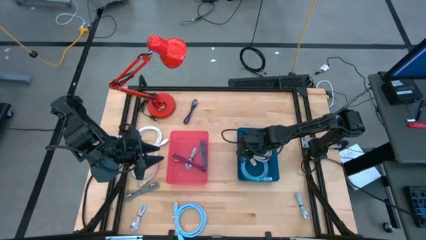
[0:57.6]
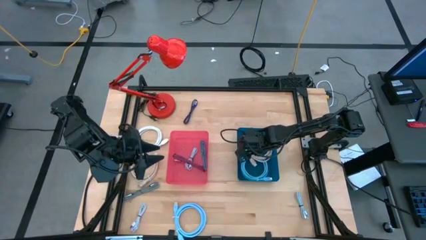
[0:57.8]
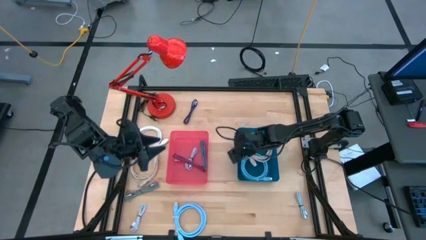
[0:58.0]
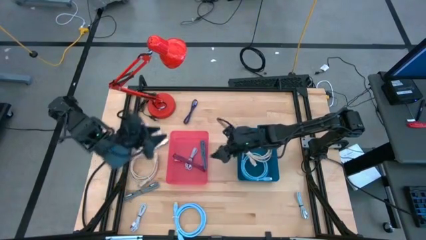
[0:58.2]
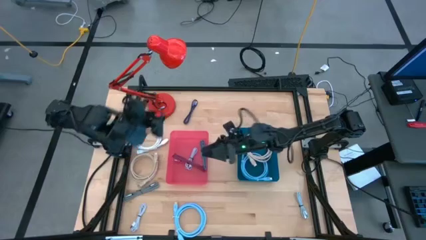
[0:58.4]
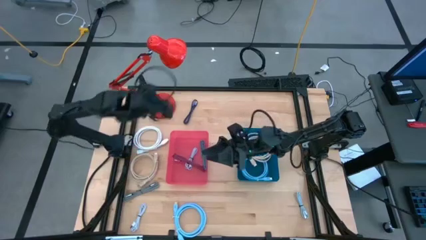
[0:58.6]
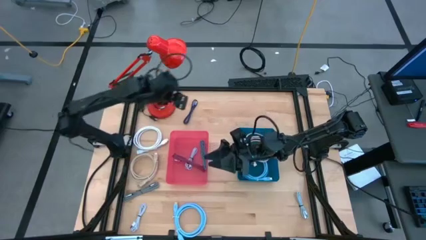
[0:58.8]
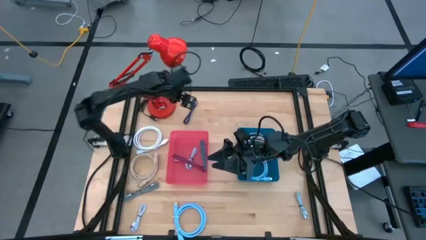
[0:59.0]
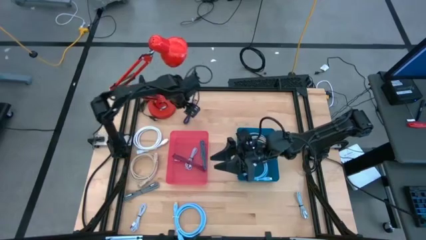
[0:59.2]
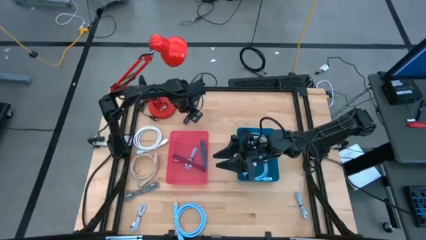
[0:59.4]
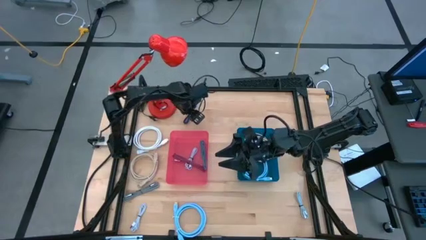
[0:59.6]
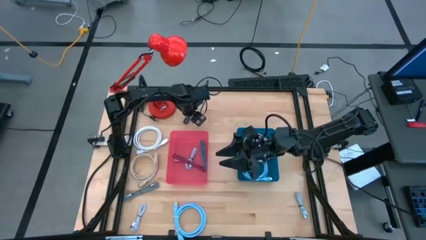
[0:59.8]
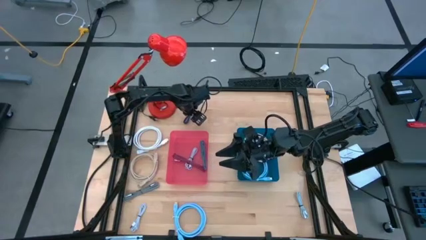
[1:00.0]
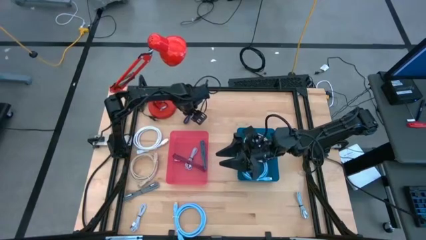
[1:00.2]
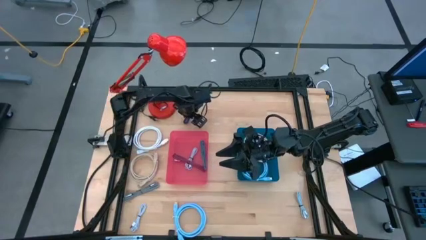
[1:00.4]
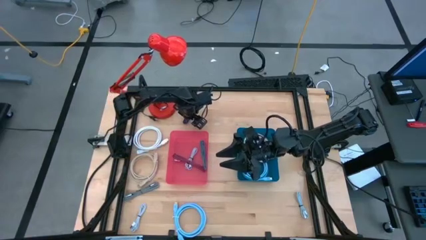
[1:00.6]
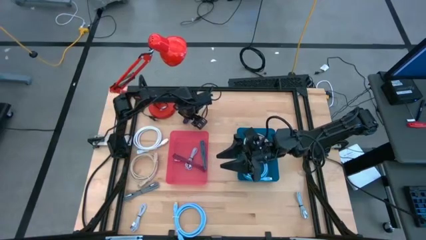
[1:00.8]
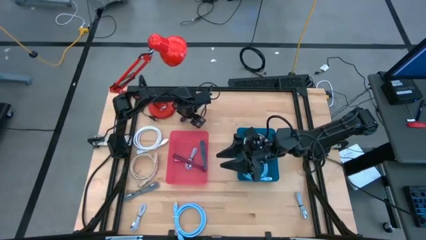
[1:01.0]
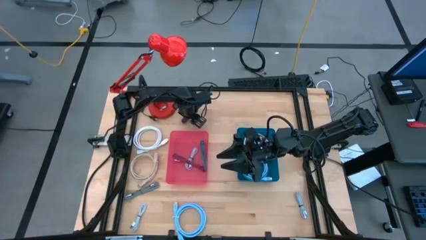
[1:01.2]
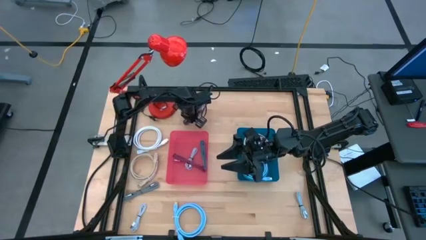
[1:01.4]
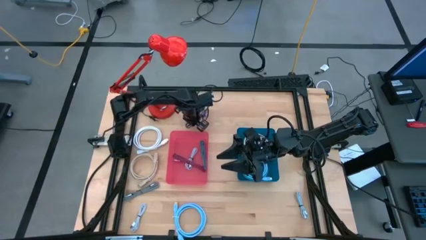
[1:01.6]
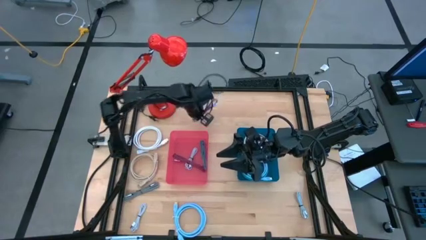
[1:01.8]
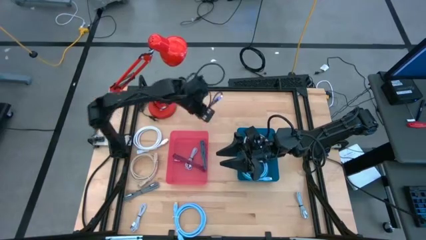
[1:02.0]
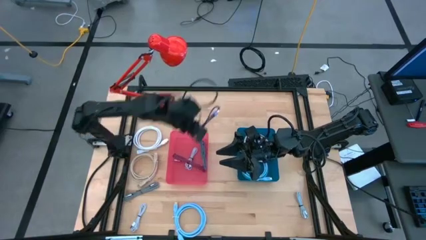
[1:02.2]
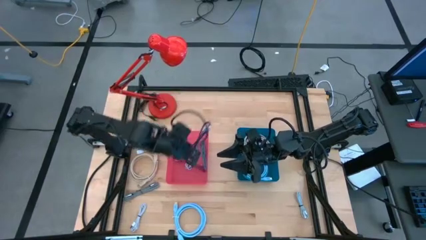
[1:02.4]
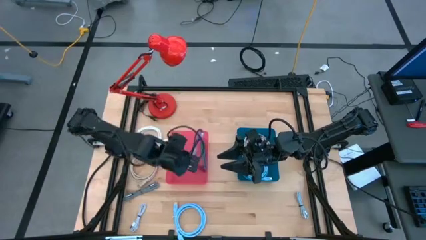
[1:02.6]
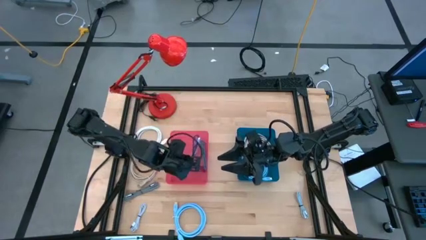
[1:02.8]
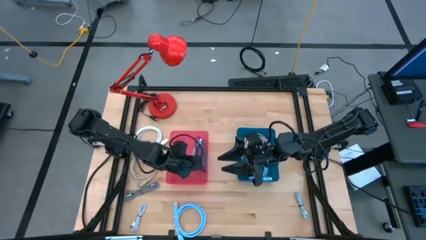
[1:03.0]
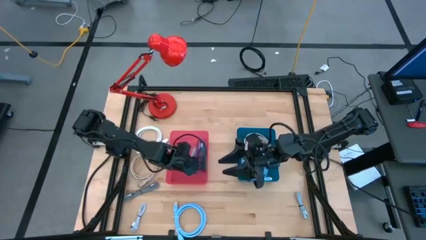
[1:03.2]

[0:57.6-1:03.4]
Task: Pick & Place USB Port
Put the black and violet charger cable into the red bin

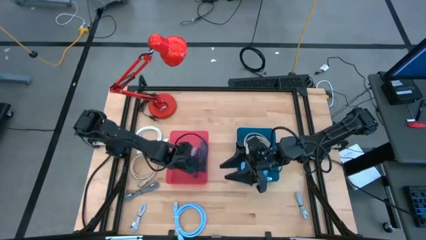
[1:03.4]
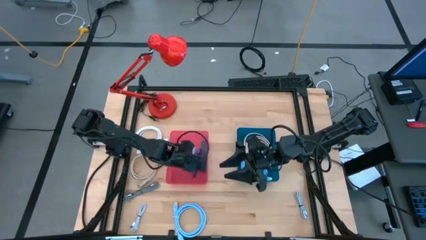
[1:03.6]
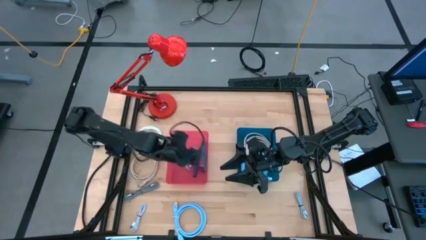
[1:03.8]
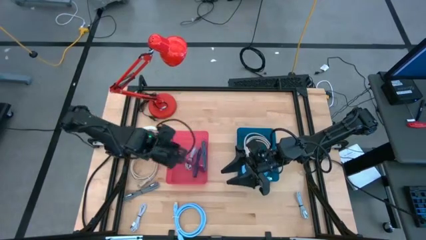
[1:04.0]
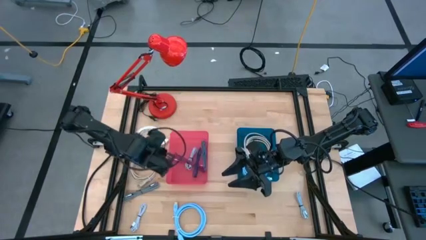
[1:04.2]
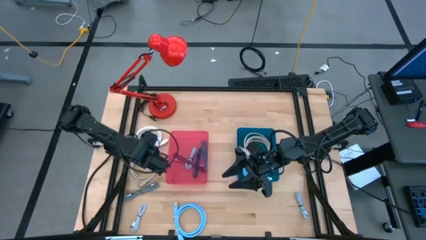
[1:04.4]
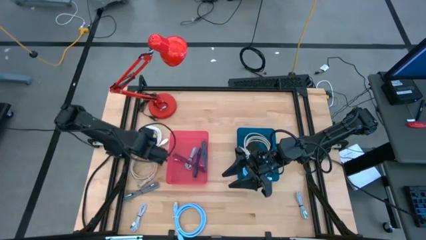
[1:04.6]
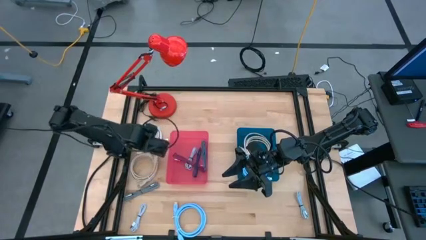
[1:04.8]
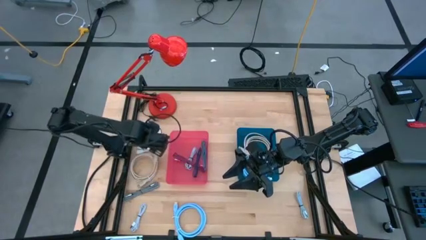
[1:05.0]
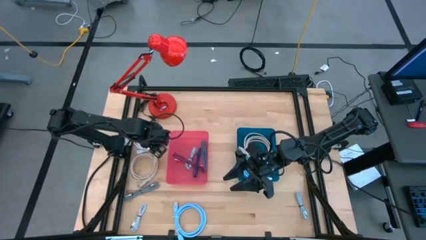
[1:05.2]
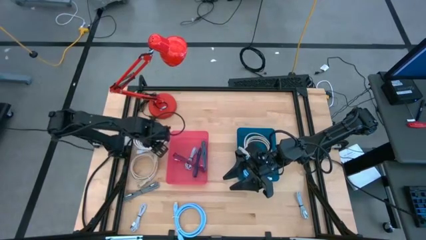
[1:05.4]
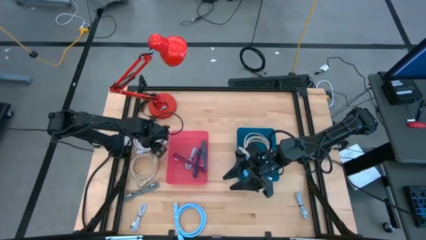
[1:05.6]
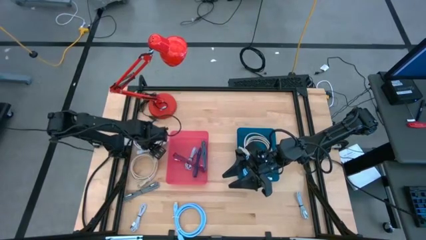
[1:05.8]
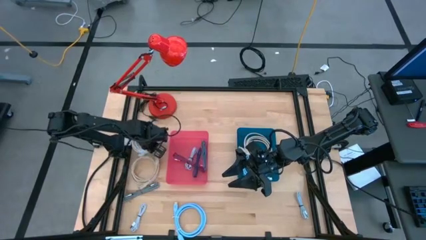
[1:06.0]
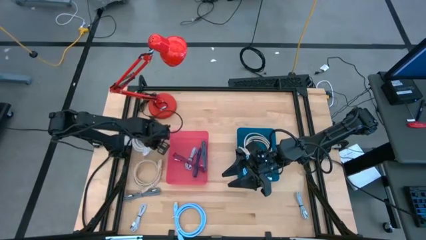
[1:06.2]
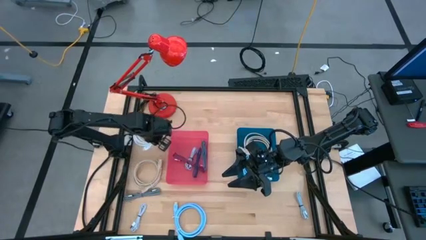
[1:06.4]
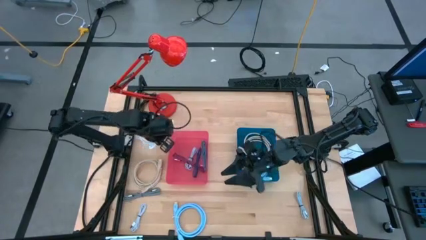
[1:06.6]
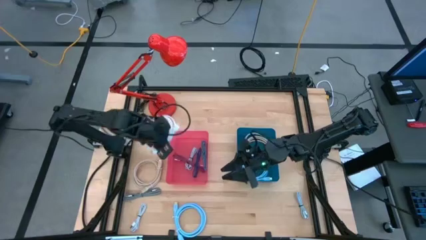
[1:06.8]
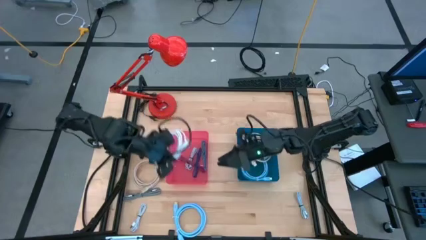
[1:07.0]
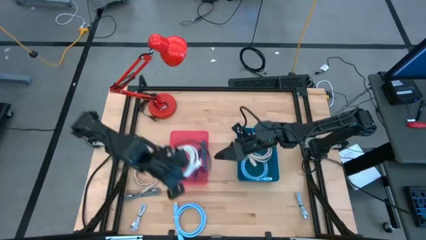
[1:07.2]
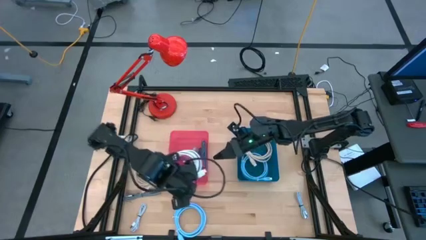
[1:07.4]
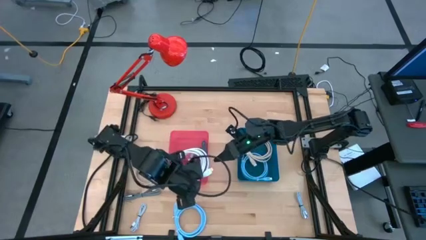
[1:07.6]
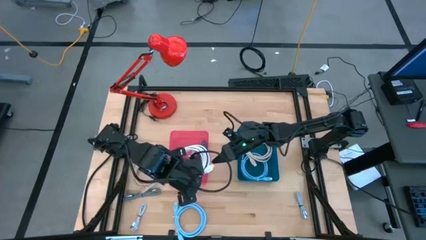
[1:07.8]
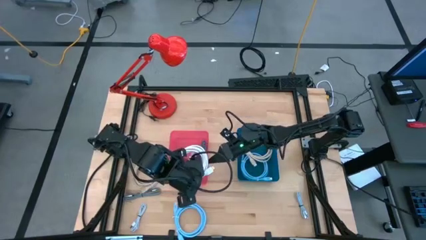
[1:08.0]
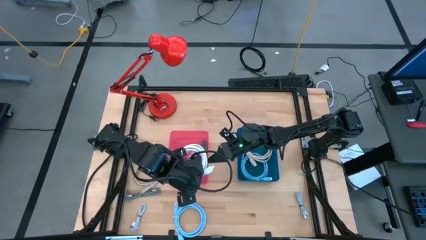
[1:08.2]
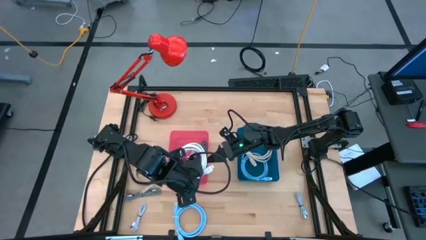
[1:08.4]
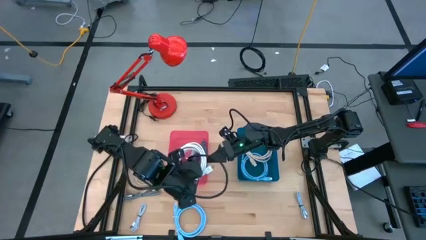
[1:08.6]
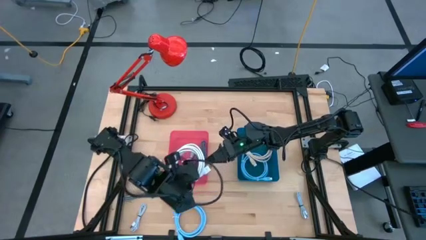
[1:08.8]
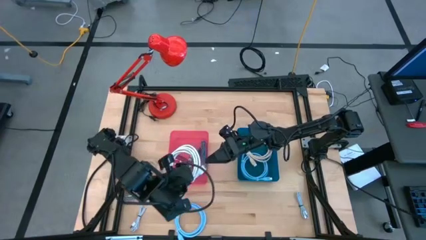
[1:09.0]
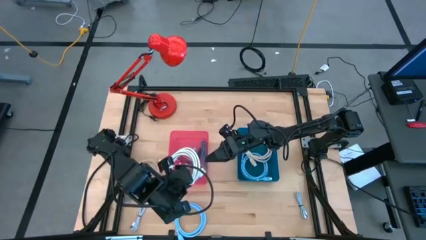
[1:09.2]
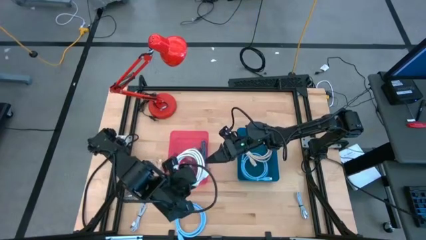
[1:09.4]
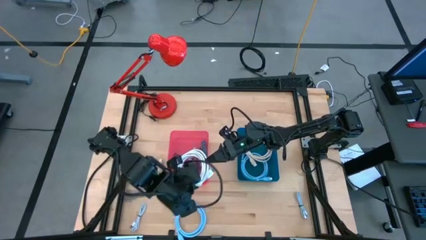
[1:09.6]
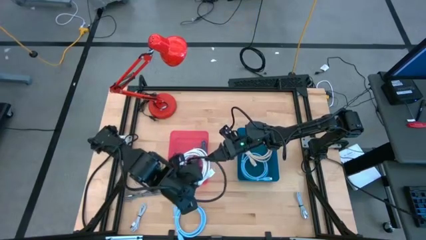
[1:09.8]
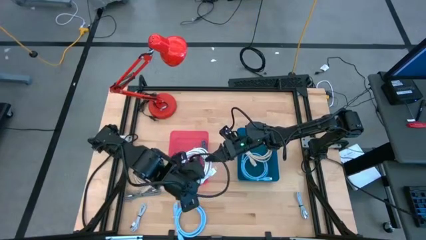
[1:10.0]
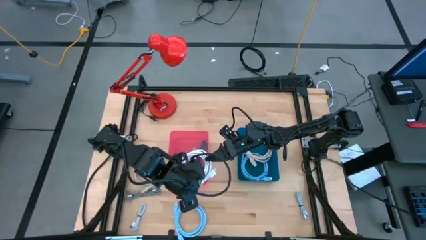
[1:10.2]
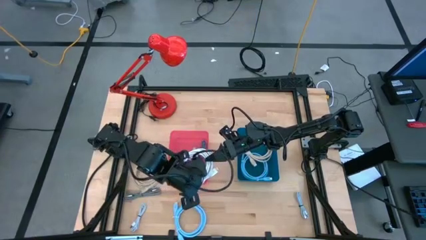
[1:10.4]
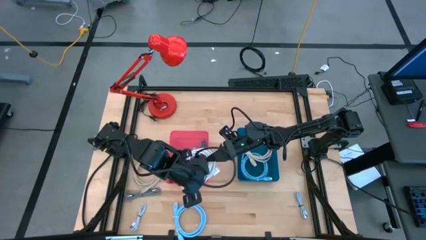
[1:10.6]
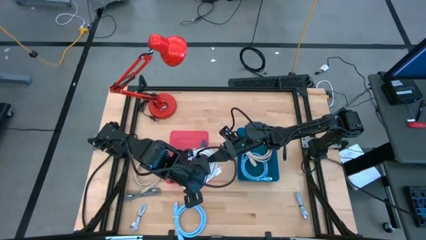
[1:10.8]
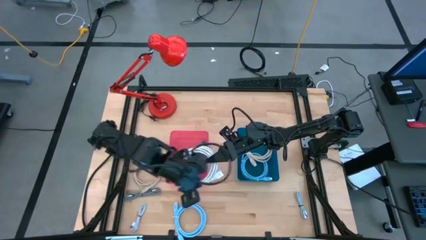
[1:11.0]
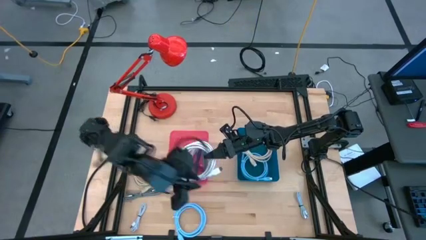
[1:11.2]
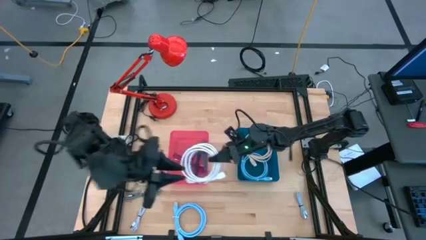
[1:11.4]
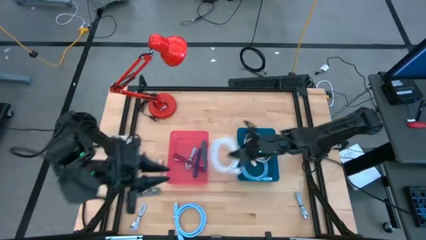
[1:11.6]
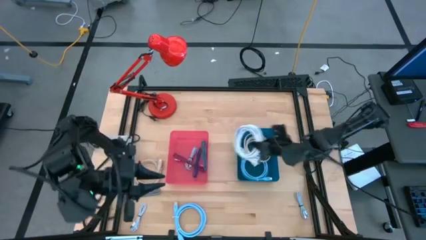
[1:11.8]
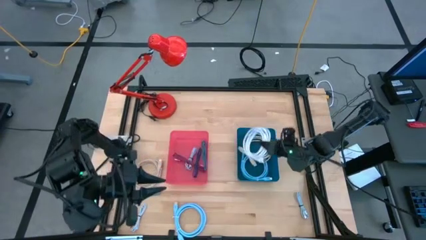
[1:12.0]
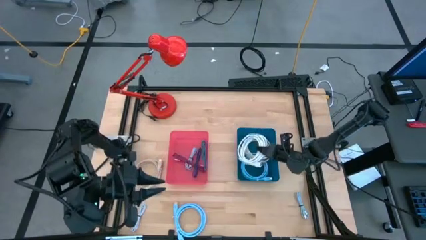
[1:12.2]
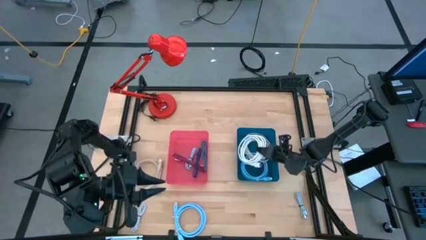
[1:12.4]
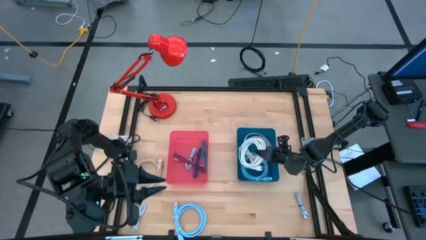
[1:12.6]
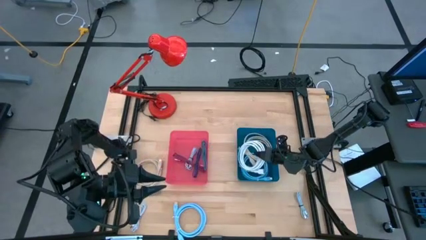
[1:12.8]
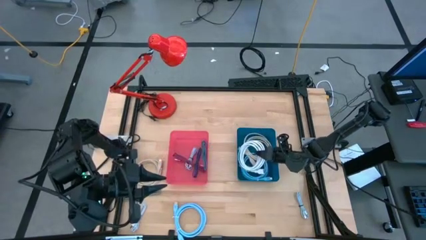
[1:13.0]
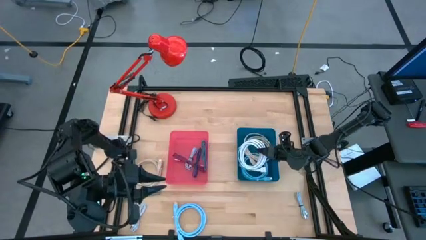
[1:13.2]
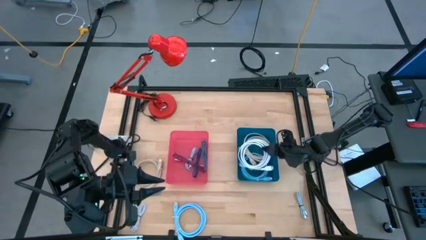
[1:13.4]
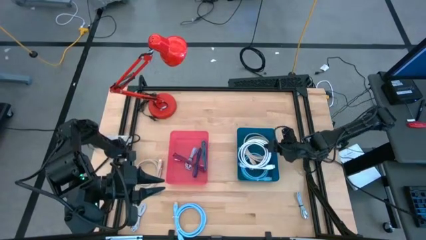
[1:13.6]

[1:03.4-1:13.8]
Put the white HDMI cable into the blue bin
